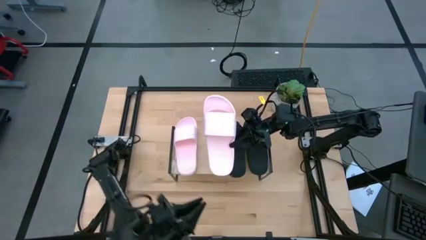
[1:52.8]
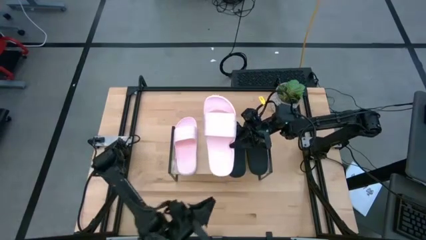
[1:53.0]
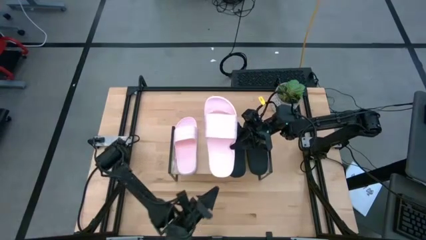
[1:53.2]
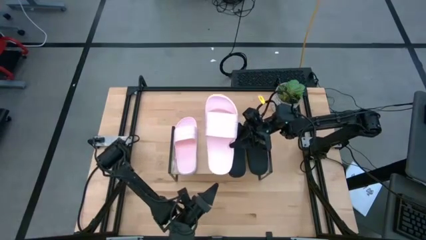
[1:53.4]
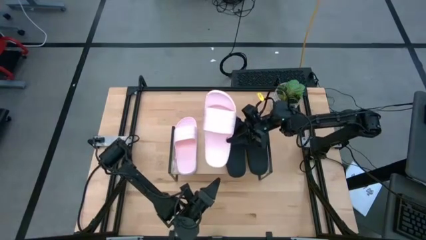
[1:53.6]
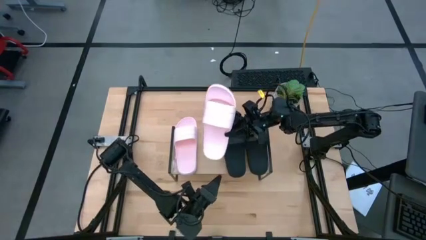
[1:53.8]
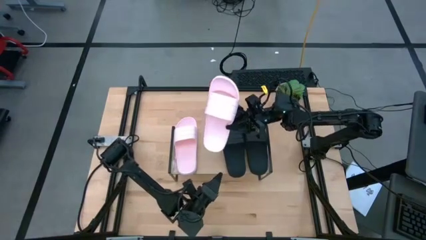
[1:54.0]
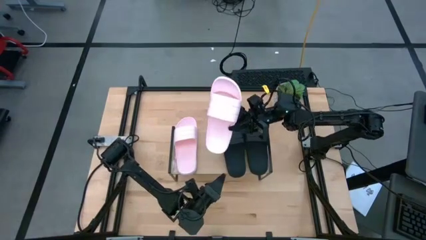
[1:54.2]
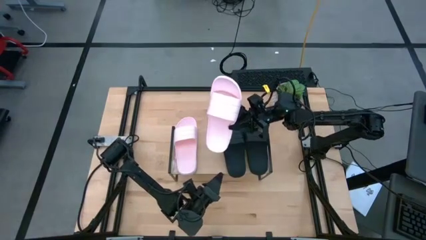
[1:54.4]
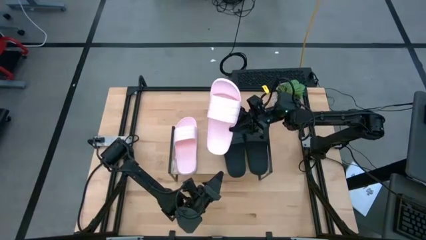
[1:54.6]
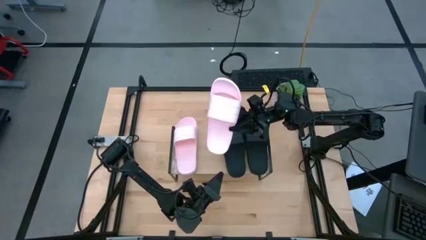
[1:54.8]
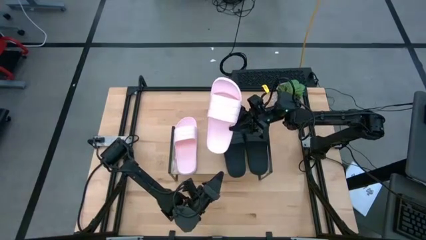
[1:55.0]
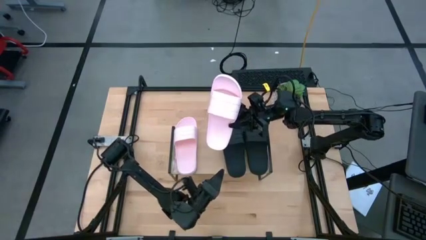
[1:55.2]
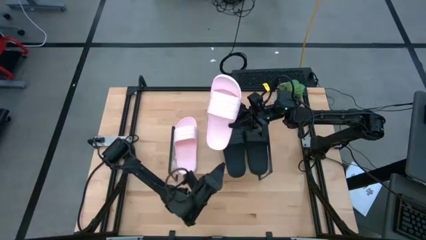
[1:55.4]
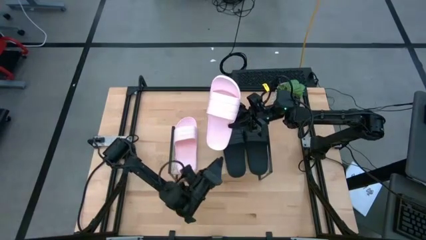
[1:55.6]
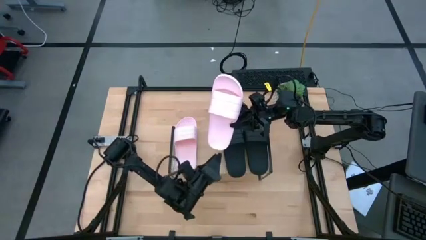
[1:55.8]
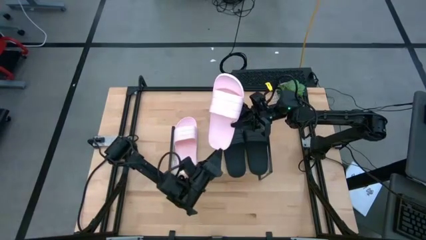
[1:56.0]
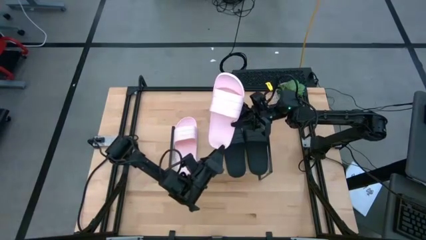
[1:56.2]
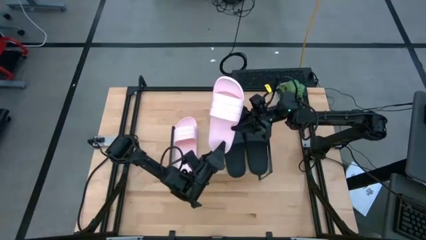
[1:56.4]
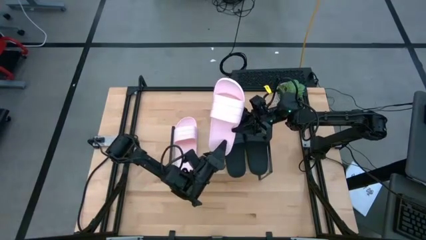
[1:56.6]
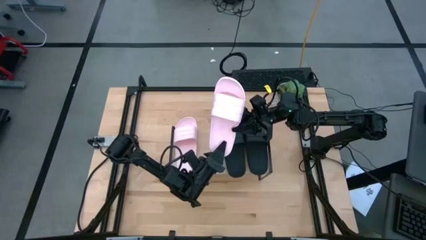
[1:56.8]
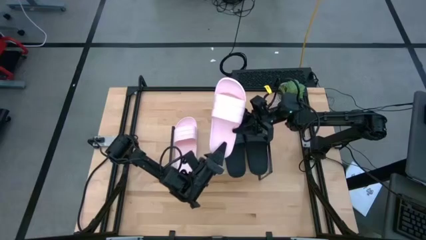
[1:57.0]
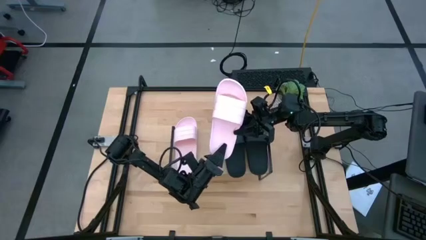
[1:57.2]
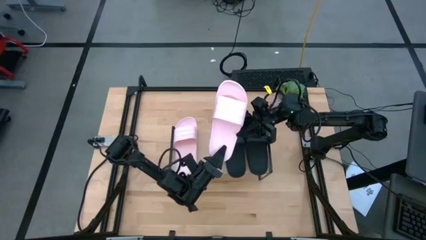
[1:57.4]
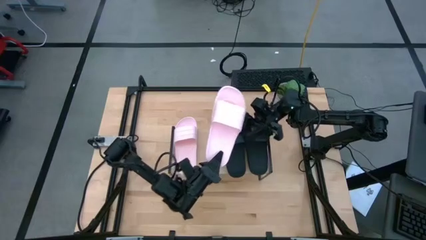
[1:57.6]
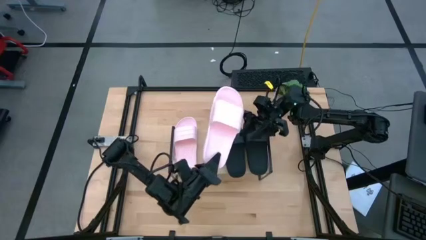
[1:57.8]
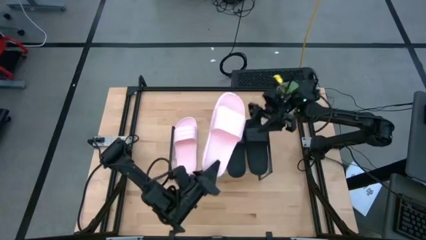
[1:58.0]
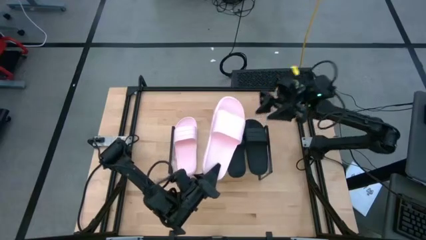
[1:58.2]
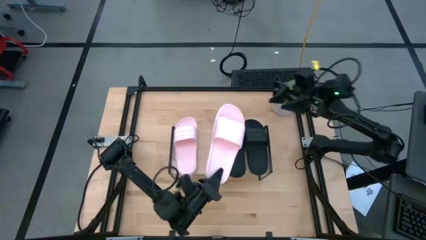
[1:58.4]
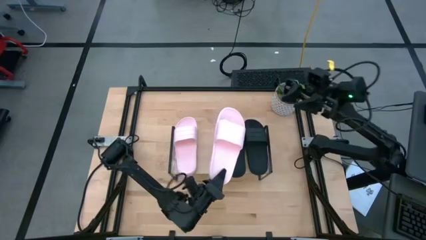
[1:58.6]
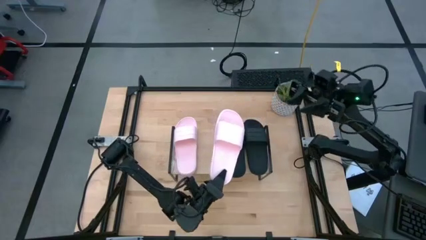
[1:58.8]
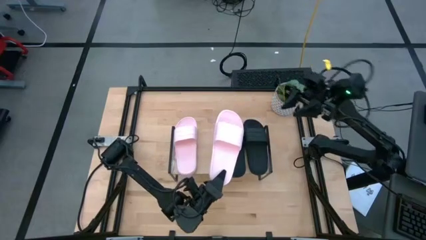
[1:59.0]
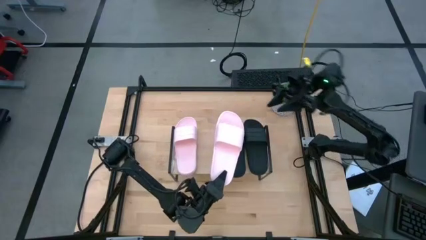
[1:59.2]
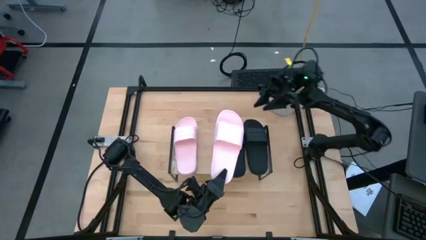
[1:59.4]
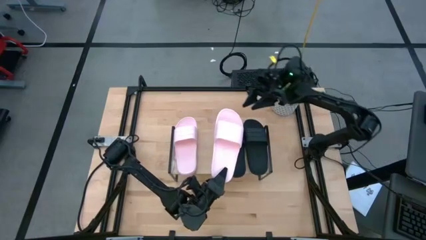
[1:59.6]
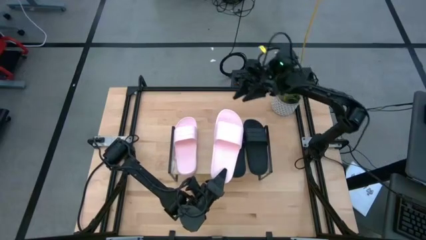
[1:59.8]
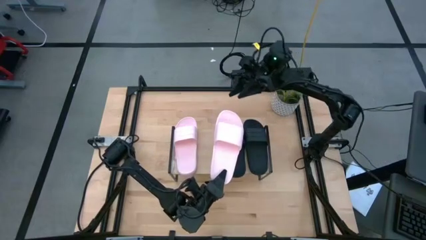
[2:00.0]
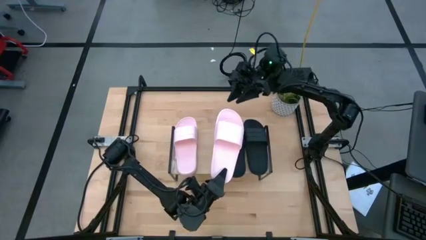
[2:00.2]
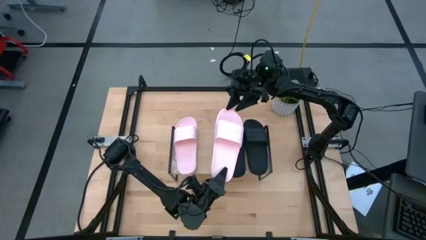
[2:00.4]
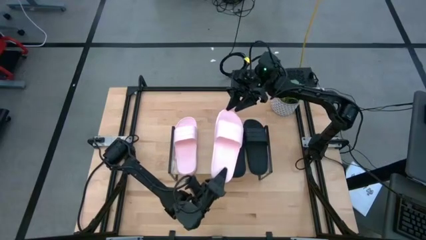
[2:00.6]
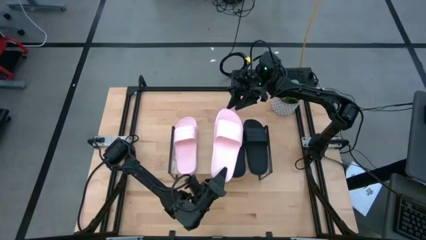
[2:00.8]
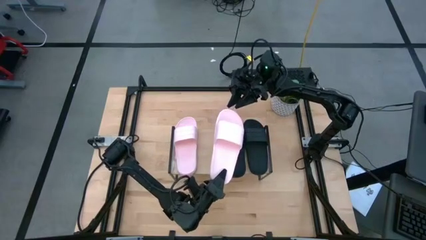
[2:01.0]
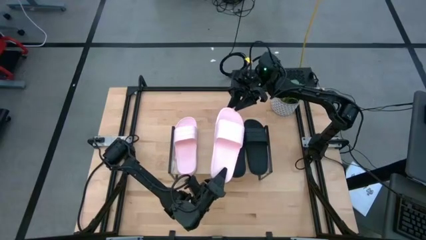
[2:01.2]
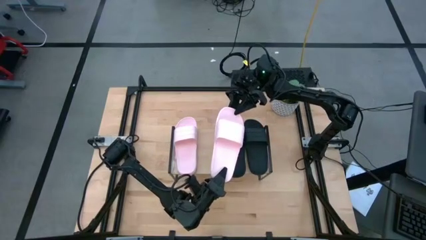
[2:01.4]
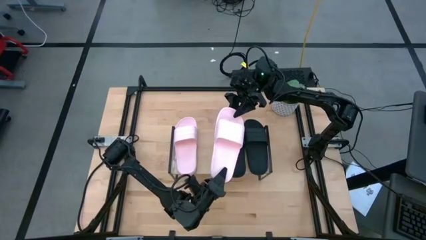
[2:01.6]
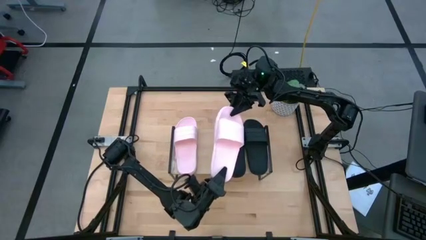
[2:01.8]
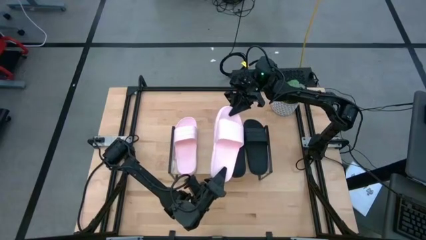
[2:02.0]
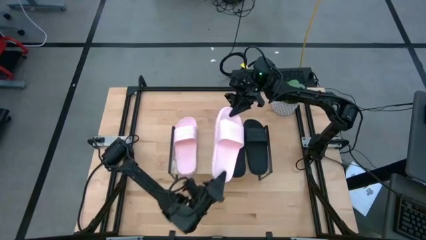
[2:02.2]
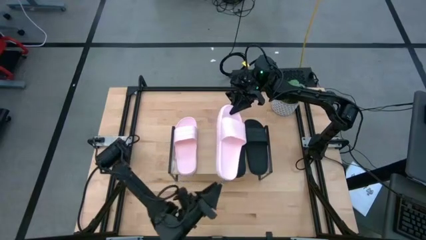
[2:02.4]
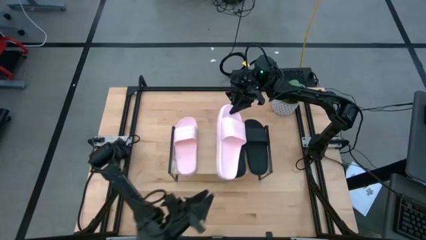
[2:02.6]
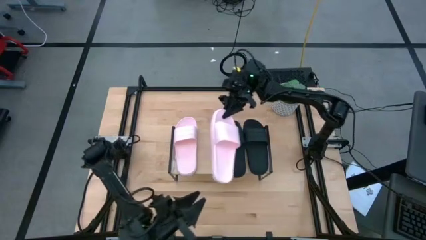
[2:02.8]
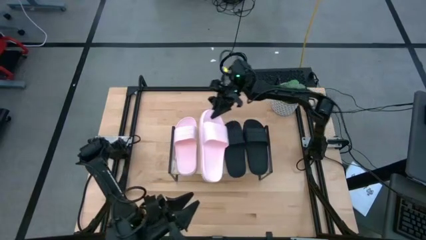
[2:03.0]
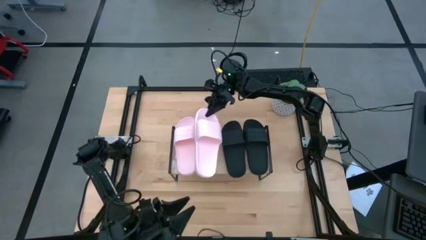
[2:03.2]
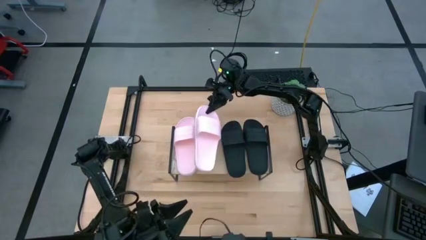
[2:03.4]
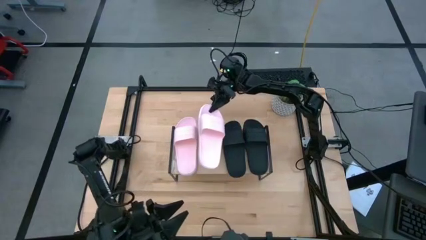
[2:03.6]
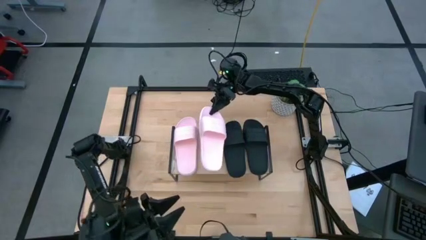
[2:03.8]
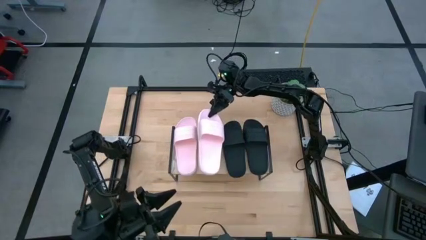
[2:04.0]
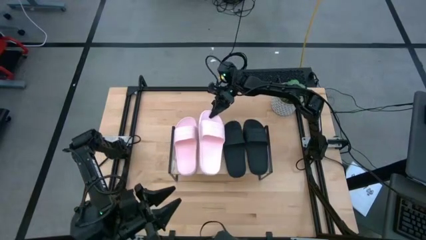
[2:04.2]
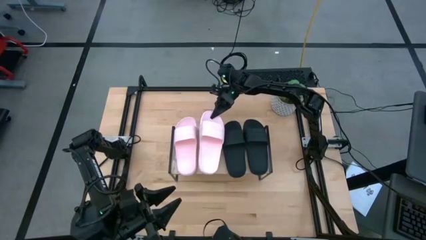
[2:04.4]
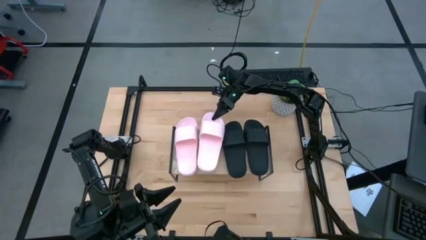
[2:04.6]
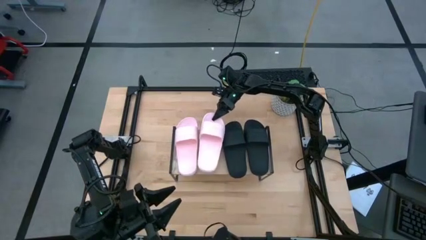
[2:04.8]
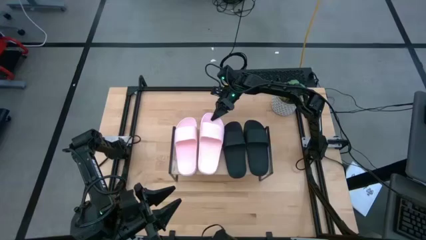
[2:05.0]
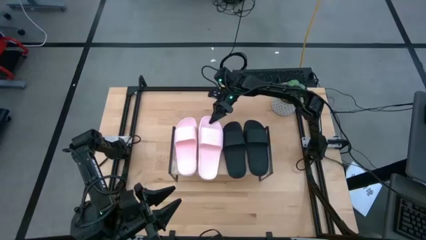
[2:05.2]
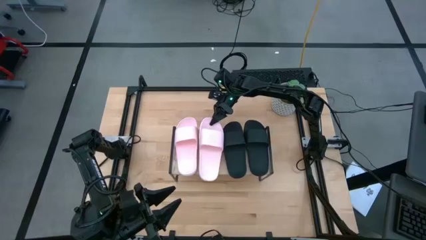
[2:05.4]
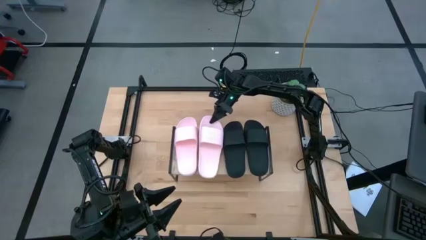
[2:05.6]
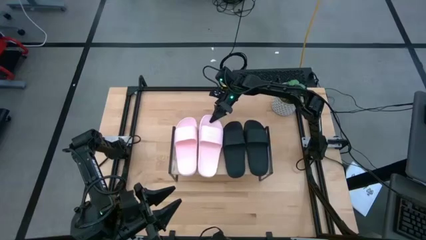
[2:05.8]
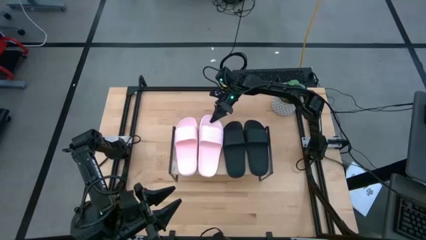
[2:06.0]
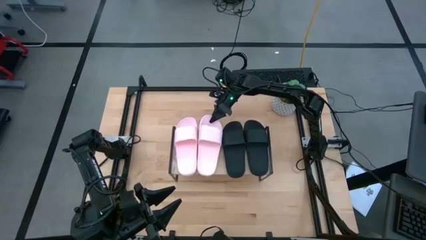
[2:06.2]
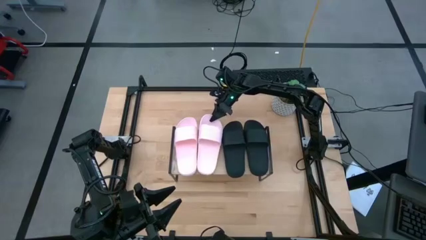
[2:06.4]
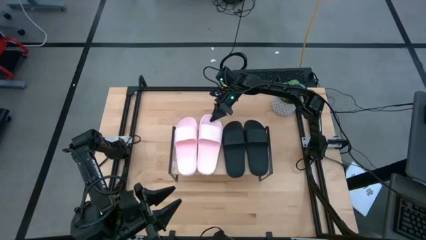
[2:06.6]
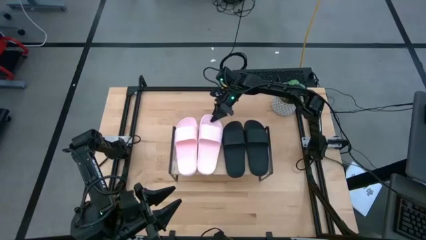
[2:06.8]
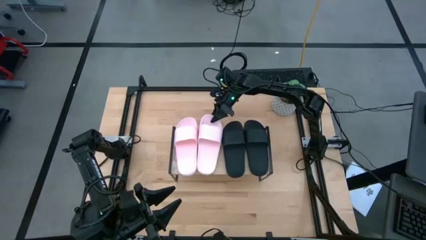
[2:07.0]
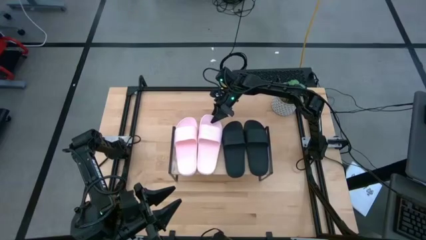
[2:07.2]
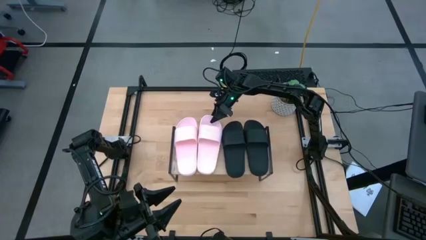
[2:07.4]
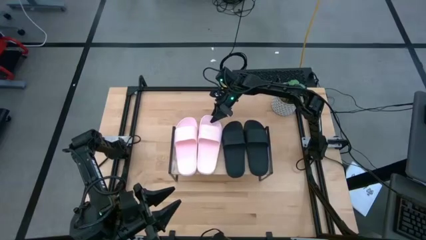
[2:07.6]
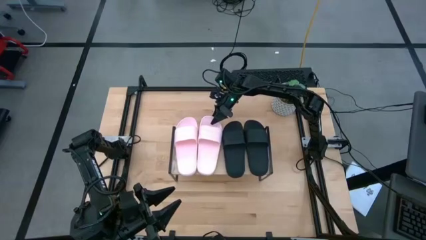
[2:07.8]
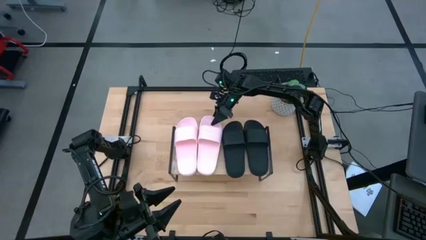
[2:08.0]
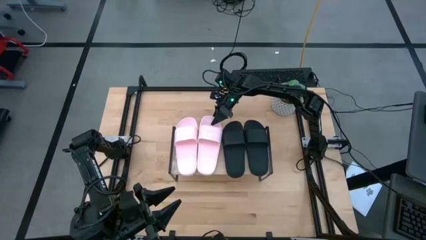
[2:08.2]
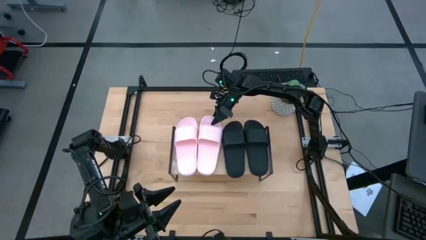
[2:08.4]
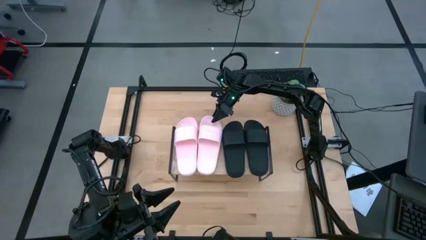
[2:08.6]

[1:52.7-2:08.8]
Task: Pick and place slides into the shelf
Put the pink slipper on the shelf
